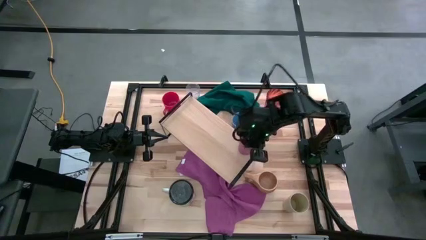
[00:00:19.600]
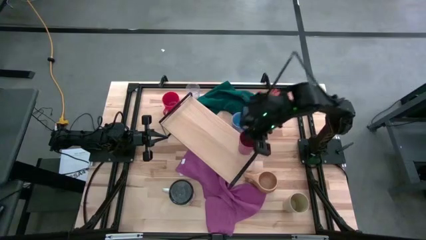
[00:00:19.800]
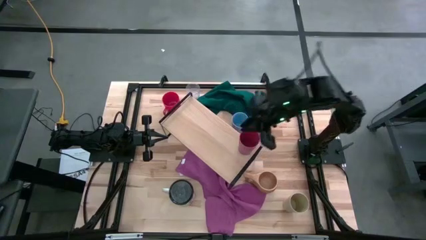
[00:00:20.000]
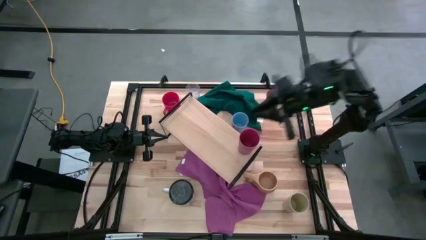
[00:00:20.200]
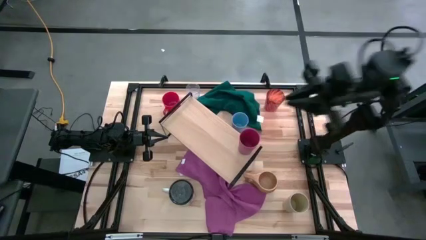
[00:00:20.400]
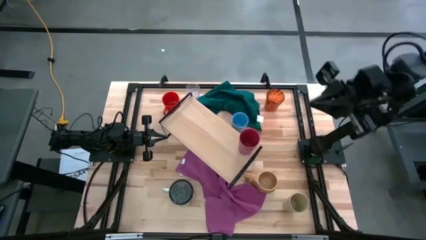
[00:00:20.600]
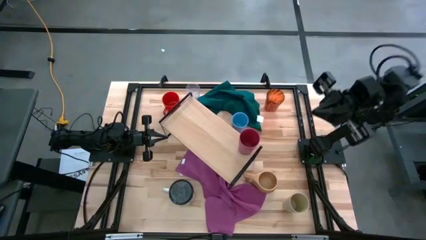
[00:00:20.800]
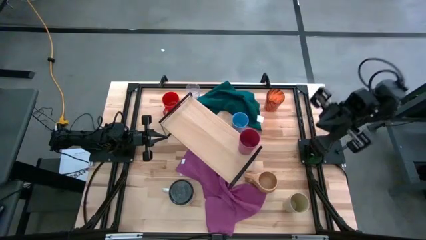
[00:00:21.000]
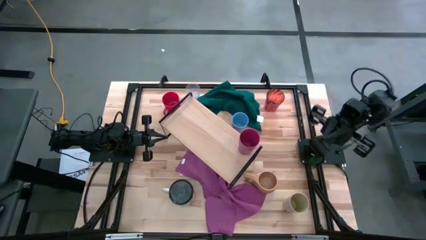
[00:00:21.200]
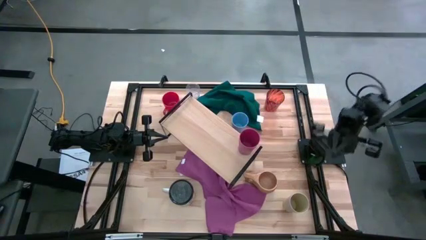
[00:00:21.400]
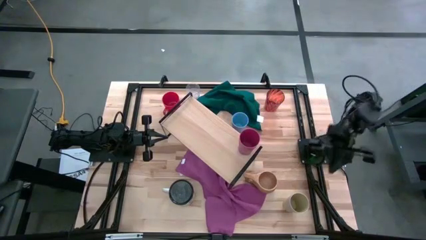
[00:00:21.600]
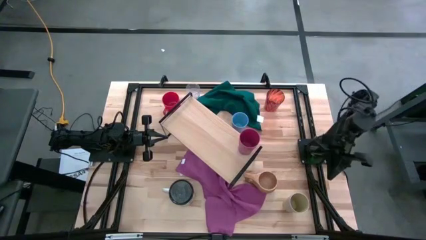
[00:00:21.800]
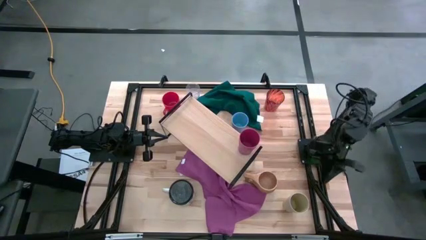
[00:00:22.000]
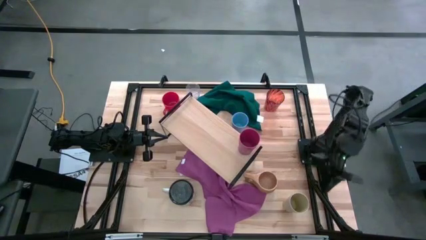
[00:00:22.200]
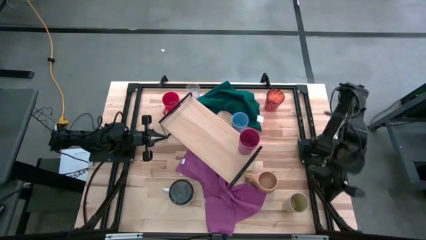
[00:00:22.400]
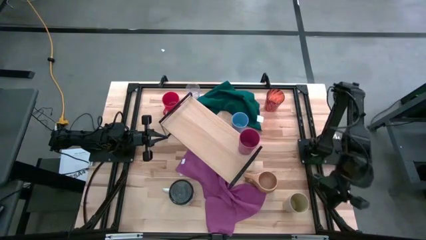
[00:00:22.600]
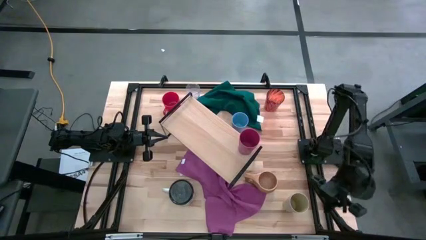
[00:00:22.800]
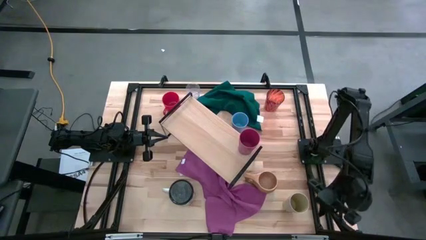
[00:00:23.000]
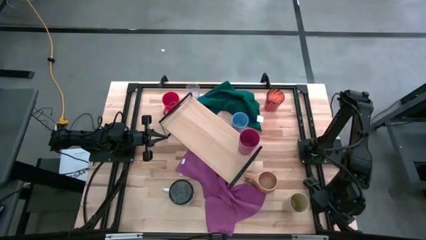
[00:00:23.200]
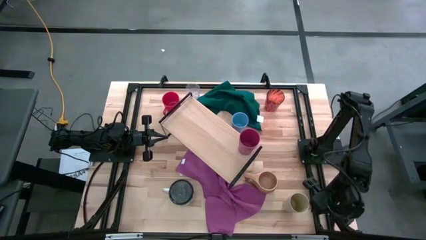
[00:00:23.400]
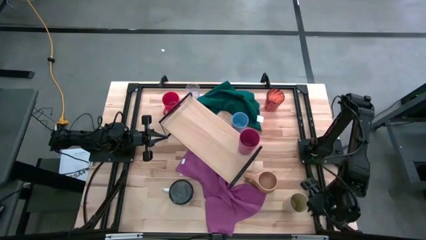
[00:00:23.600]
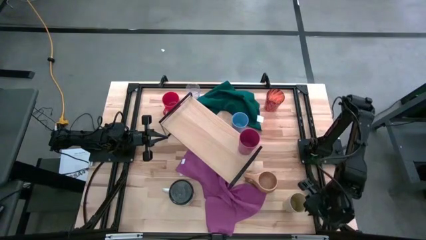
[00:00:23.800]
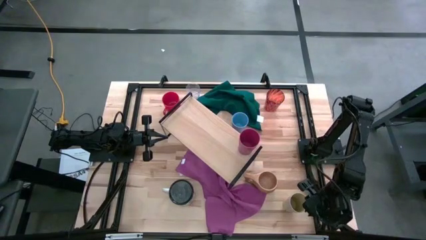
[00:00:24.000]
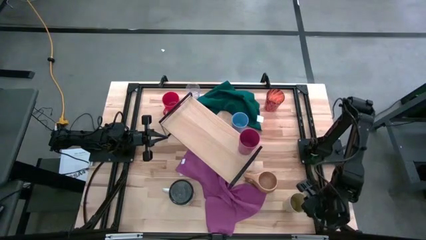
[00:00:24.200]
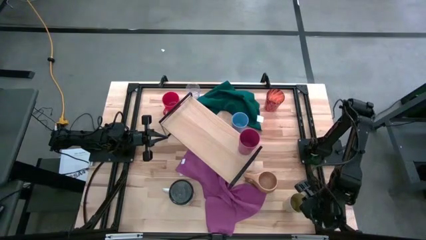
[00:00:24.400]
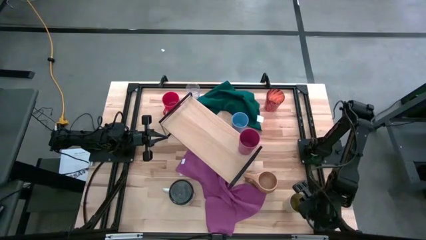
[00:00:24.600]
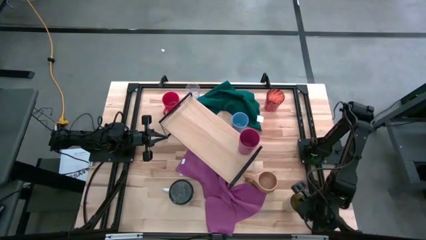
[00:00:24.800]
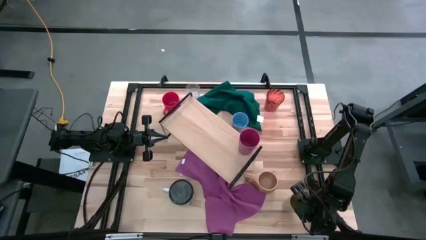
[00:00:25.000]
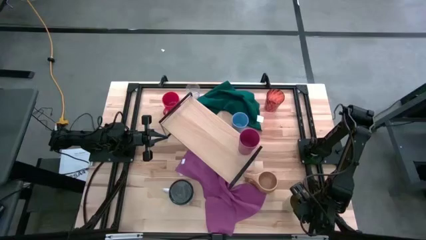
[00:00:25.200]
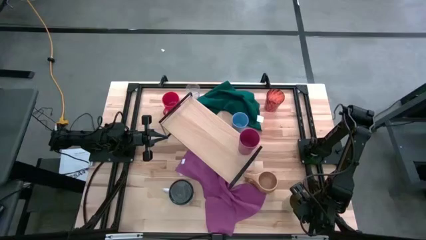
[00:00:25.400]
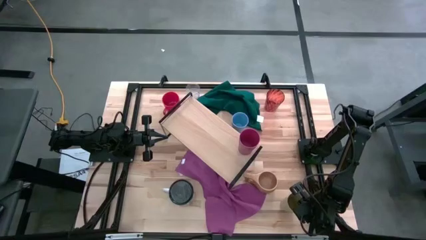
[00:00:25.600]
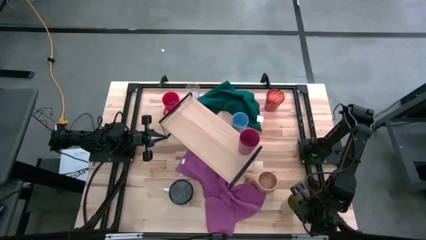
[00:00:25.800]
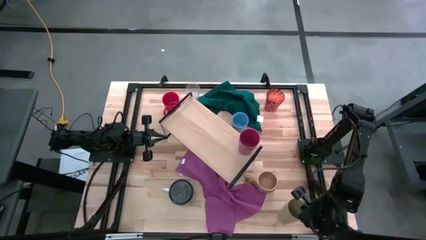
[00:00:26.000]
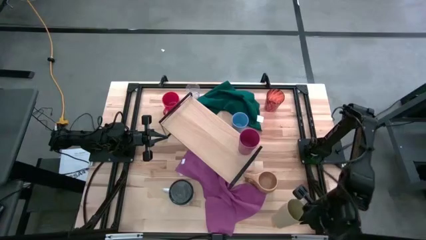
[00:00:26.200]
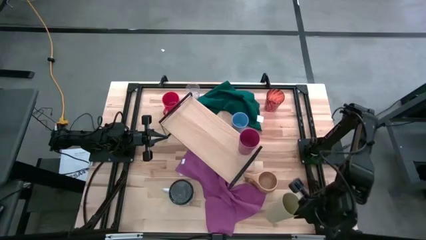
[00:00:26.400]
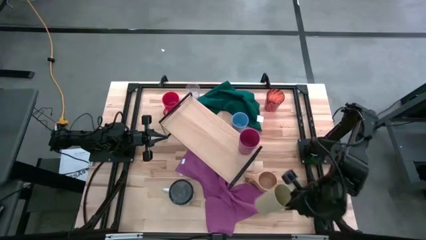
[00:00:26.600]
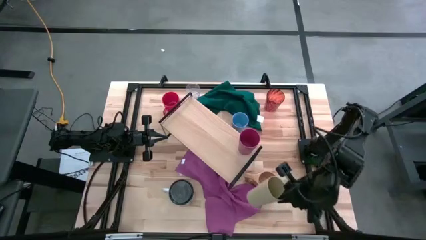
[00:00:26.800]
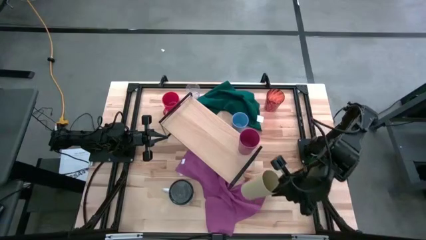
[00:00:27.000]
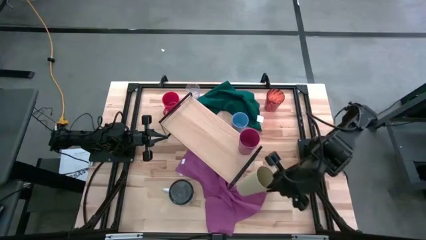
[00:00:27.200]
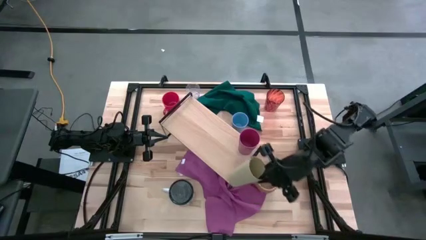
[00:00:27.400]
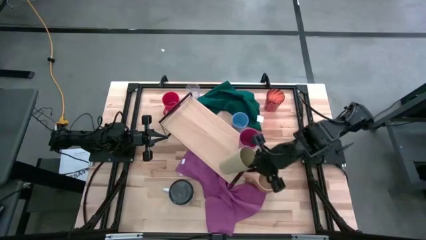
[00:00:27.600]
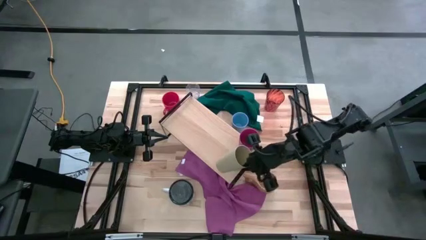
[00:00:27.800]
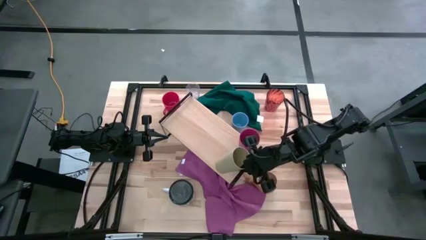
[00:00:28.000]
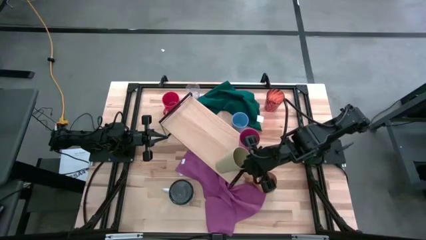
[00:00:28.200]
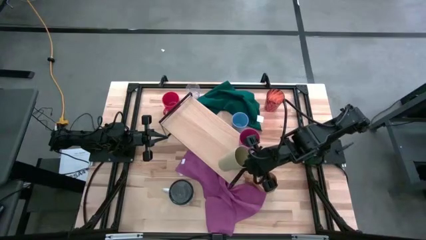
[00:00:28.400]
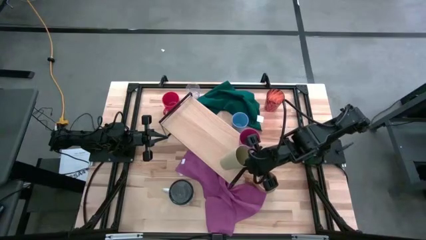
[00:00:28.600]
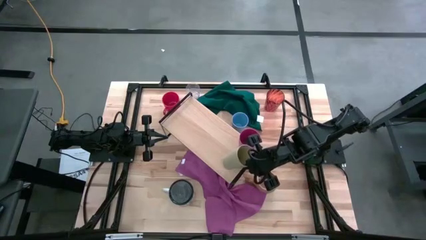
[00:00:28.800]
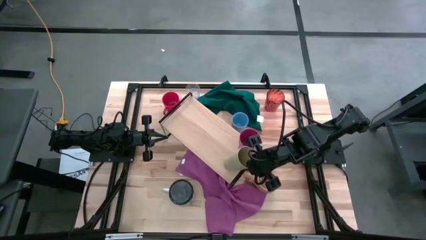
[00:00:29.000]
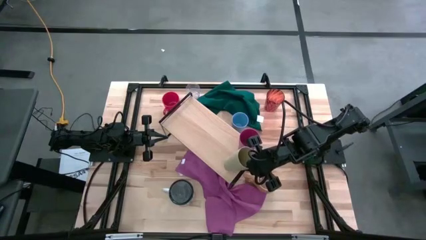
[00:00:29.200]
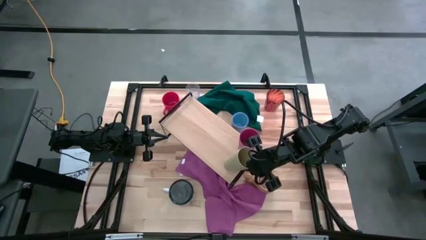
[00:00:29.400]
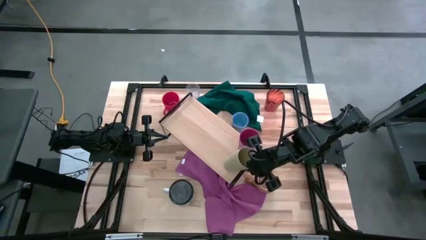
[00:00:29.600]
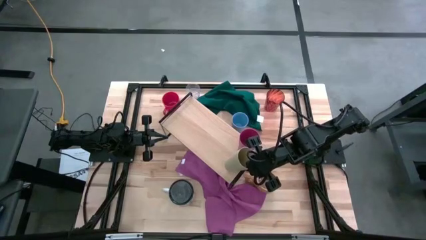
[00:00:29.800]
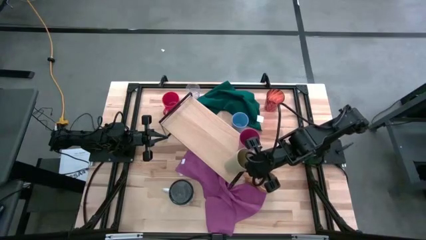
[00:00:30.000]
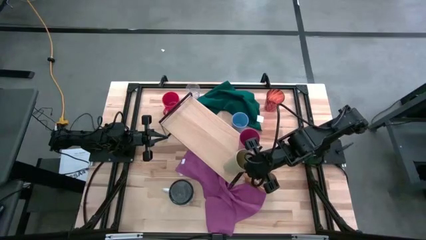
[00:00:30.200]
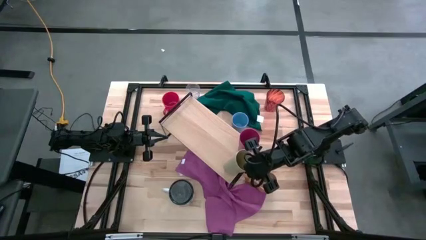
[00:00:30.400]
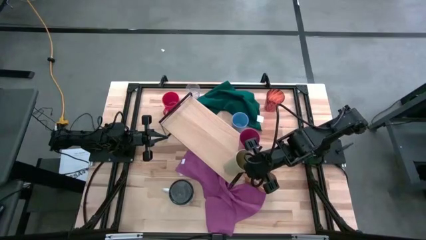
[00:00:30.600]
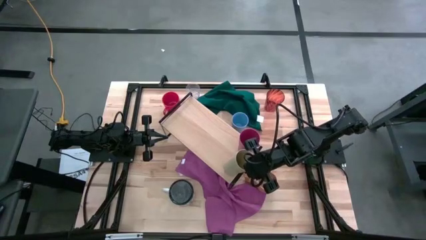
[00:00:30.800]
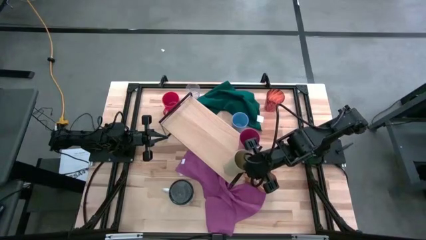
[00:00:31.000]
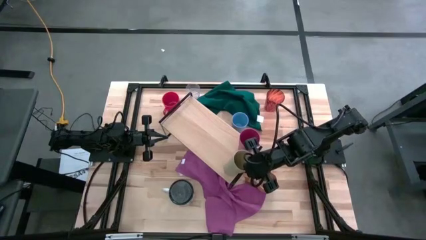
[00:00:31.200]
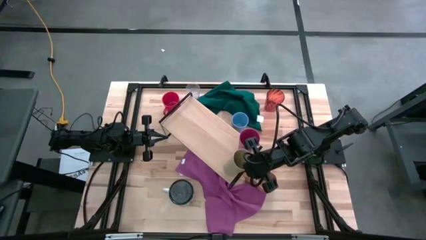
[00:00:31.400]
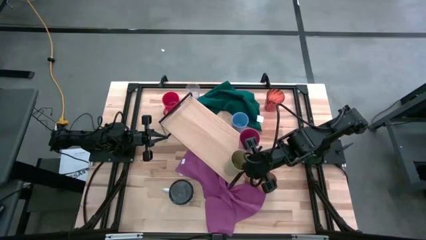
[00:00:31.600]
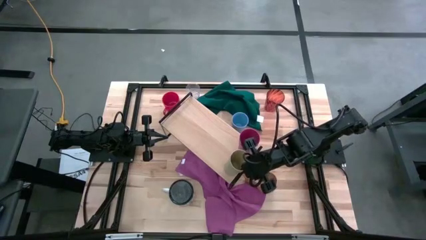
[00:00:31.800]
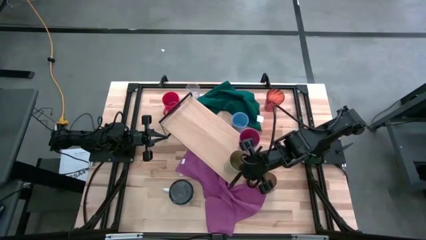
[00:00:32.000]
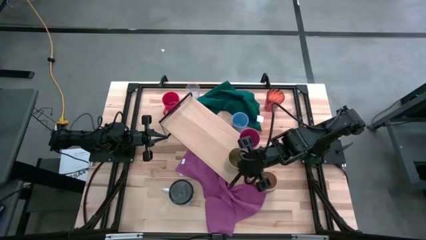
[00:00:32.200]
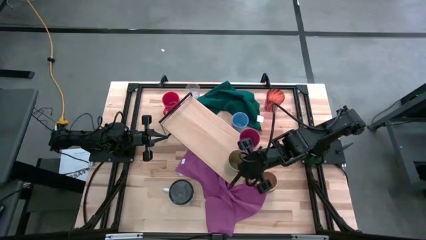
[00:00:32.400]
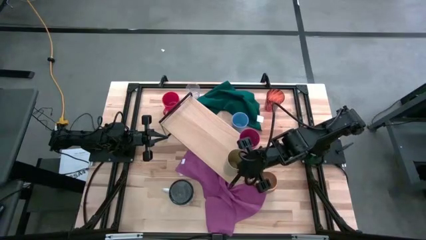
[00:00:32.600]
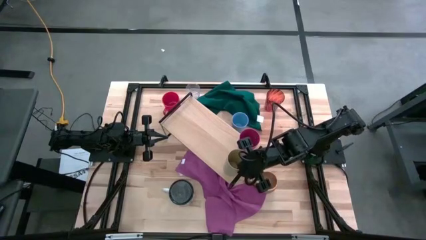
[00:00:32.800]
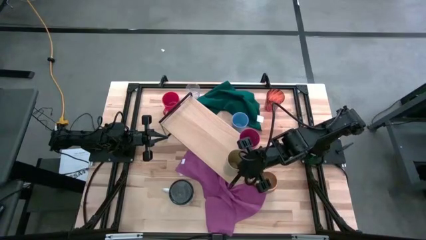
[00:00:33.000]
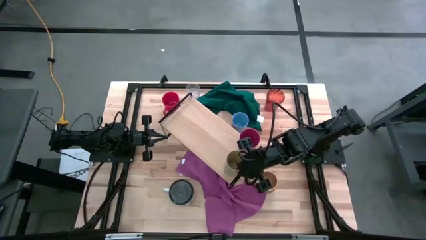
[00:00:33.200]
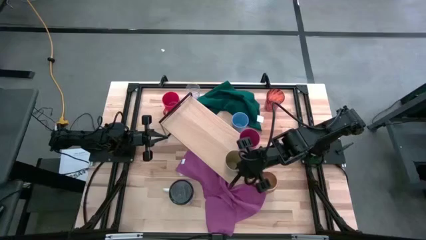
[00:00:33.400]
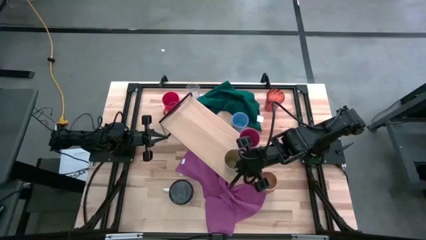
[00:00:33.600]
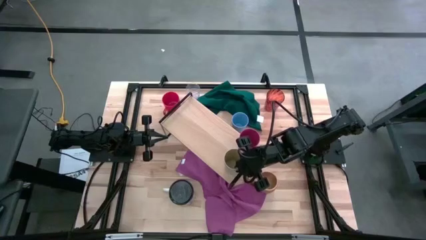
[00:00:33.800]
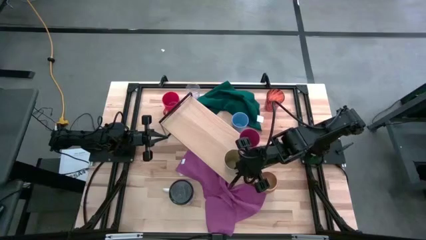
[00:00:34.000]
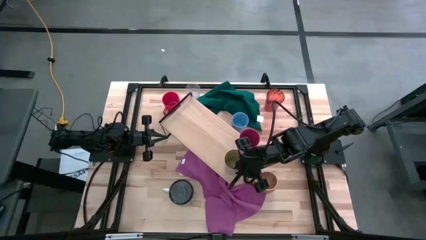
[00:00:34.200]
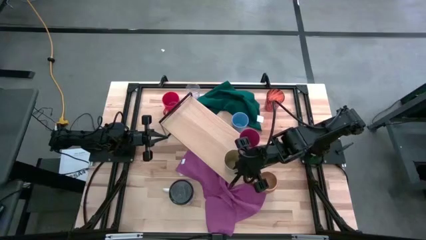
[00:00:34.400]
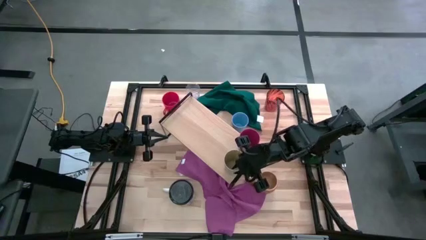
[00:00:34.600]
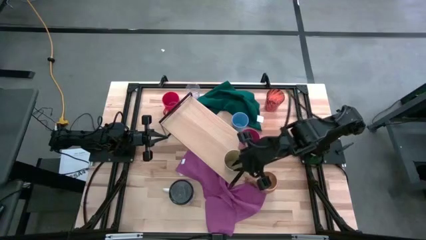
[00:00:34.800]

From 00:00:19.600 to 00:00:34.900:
Task: Stack small to large cups/mugs on shelf
Put the gray cup on the shelf
